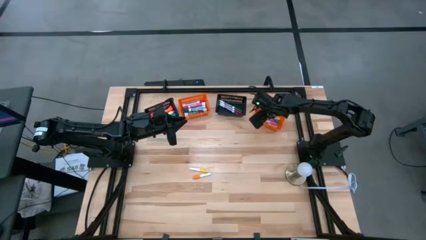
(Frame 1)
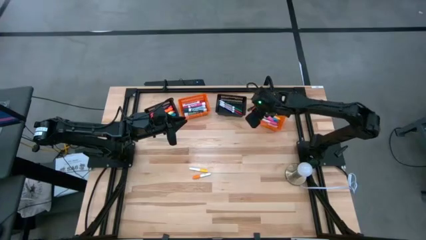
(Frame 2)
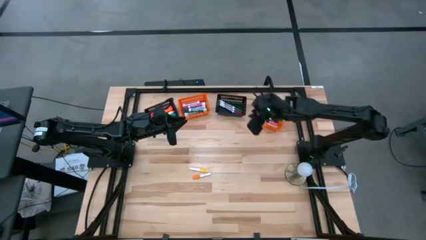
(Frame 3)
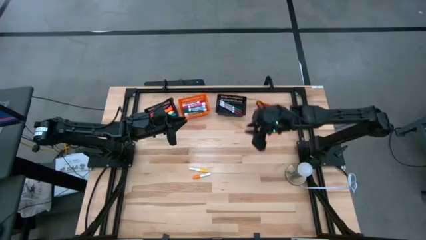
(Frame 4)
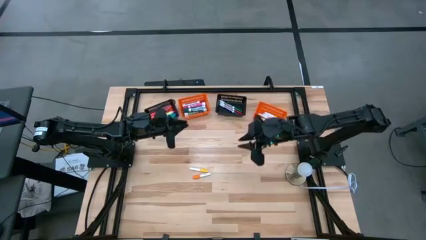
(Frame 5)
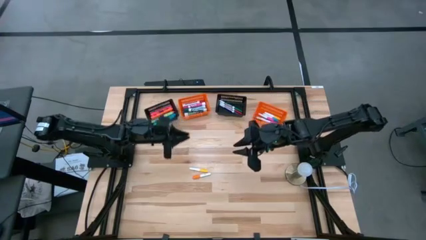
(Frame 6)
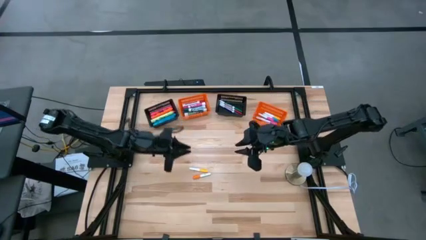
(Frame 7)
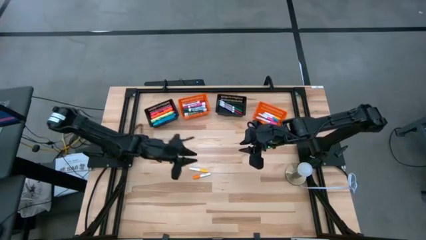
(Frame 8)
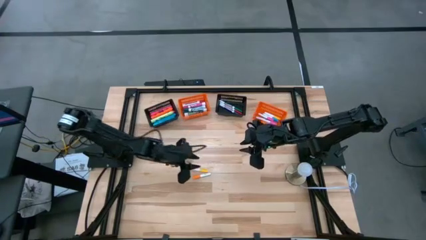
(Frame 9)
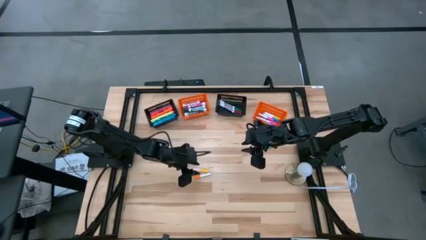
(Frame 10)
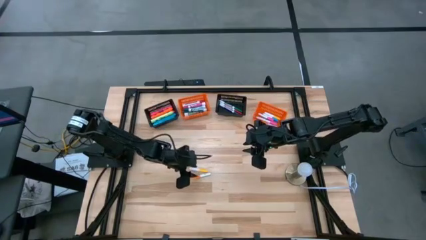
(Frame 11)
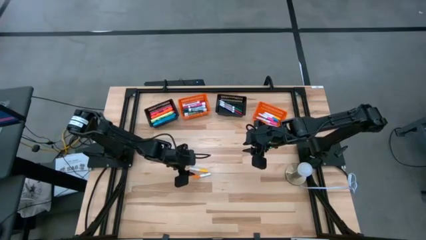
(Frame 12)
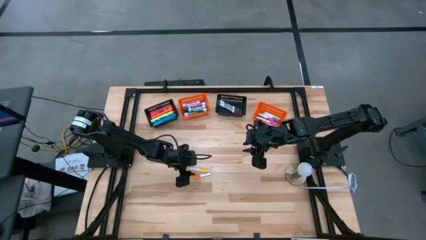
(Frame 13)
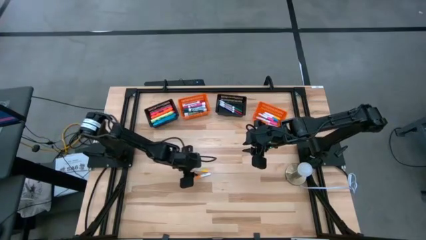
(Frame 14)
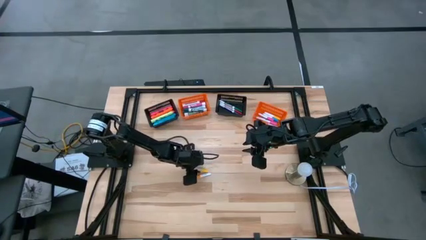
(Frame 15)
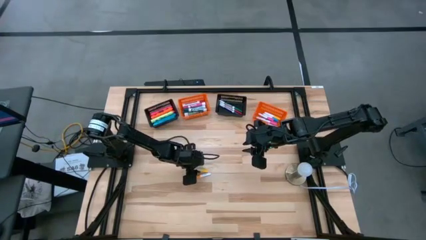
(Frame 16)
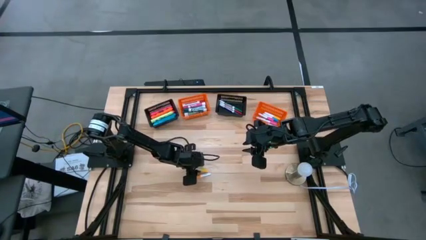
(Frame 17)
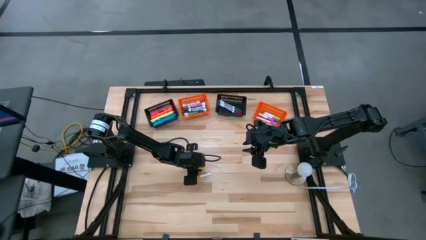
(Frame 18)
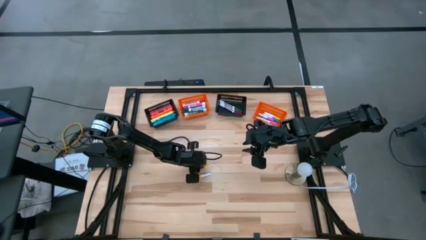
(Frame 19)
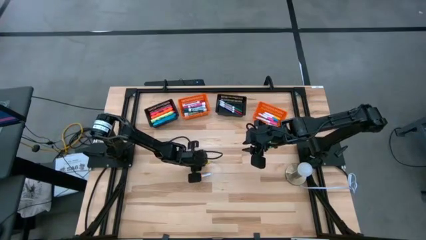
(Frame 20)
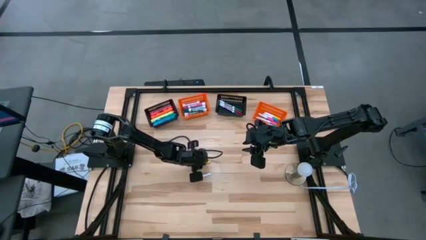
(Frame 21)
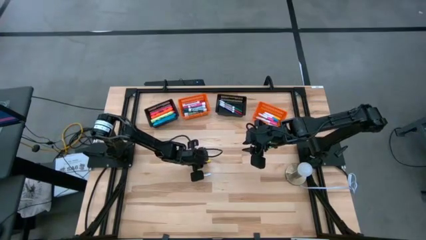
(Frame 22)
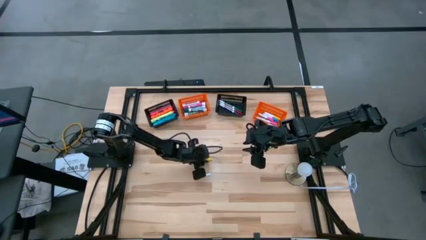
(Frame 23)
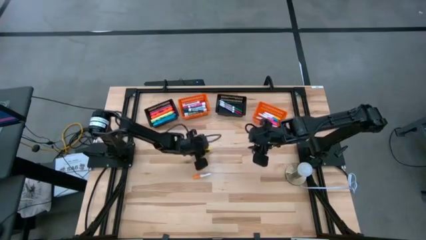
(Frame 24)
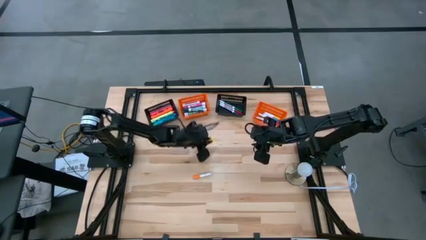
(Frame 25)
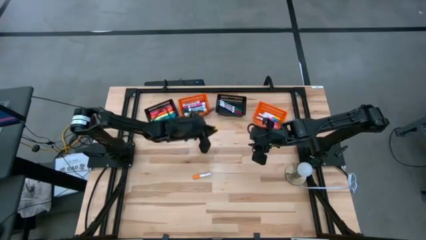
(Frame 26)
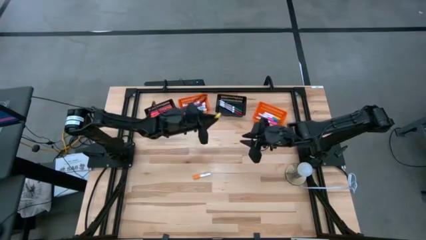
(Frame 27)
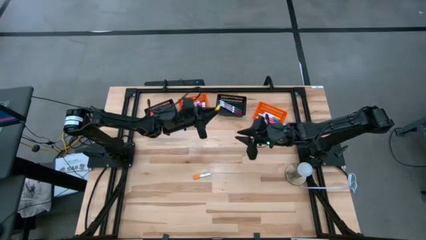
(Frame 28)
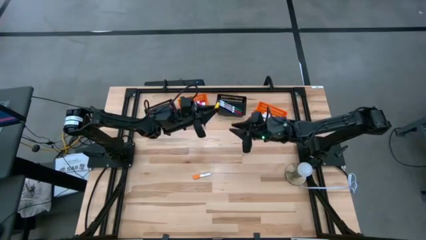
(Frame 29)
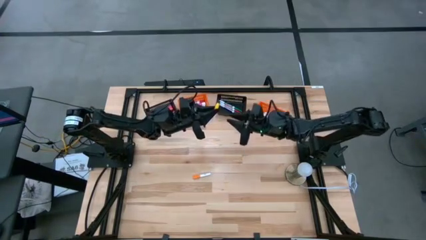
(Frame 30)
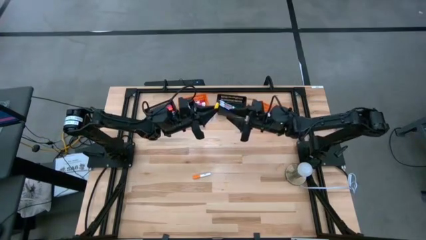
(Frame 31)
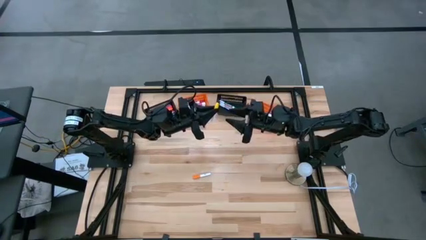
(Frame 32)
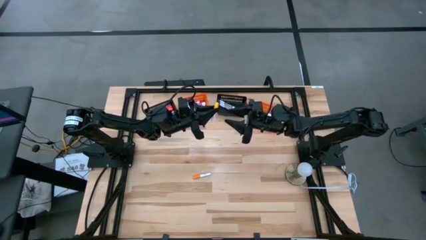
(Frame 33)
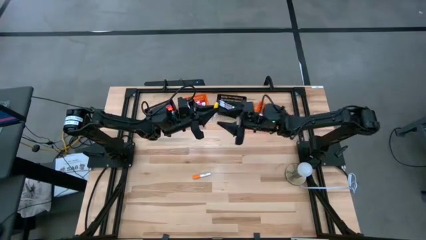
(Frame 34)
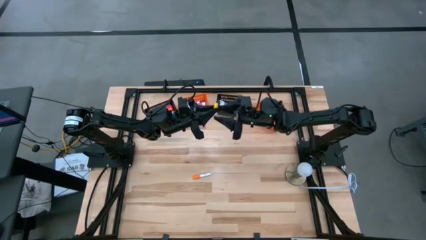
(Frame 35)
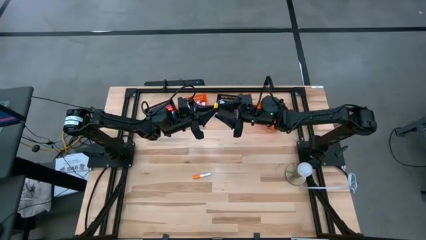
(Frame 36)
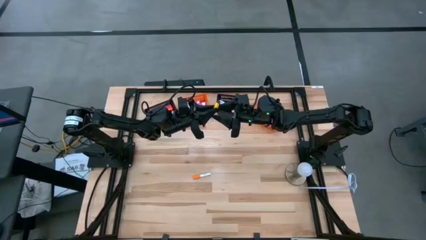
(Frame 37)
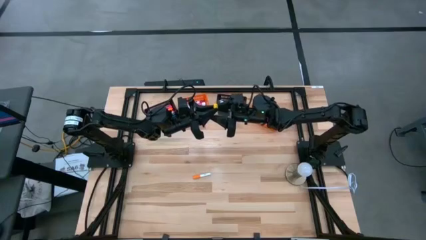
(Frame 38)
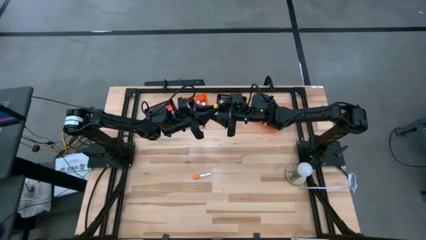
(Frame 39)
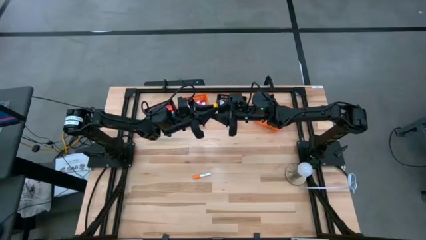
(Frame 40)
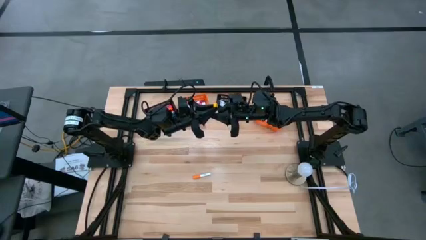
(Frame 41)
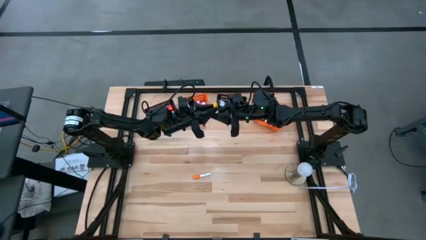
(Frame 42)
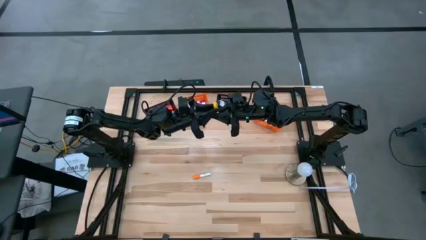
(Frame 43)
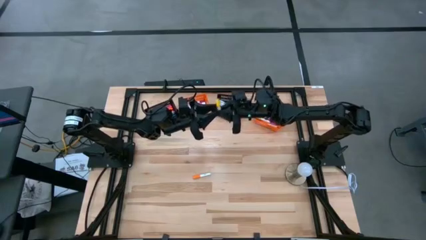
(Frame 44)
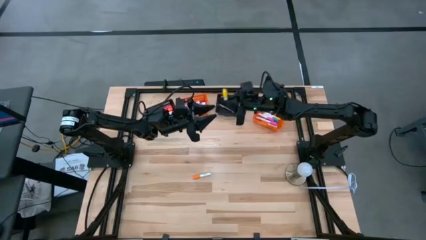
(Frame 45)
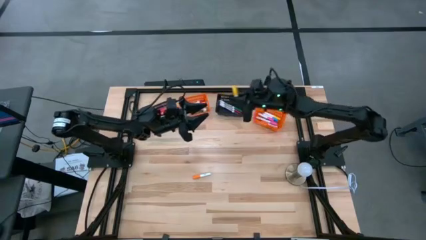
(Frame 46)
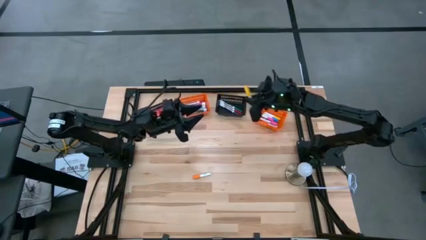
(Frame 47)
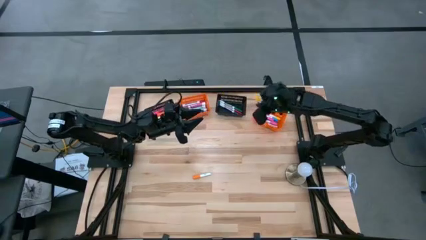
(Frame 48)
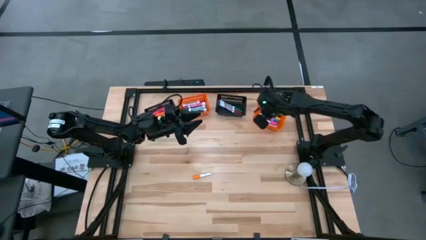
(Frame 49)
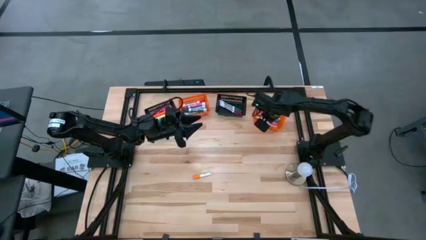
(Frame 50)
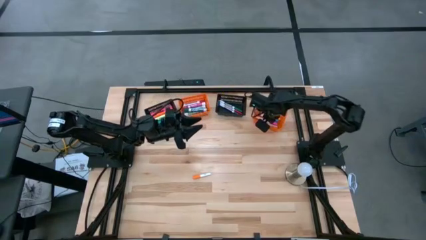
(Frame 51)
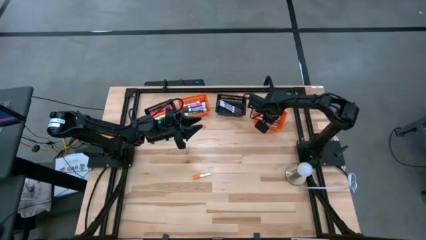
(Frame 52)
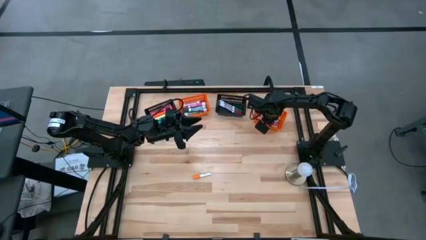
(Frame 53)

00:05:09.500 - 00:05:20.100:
Task: Pick & Place Markers
Put the yellow small highlighter pen into the left orange bin

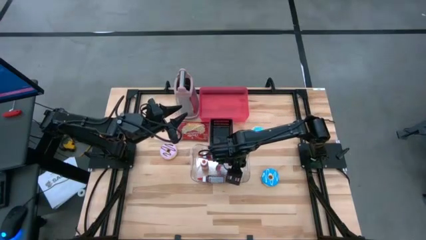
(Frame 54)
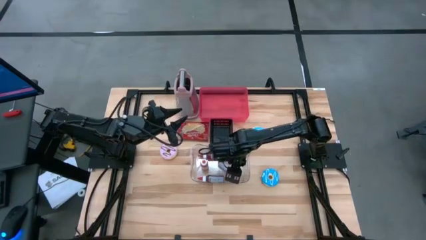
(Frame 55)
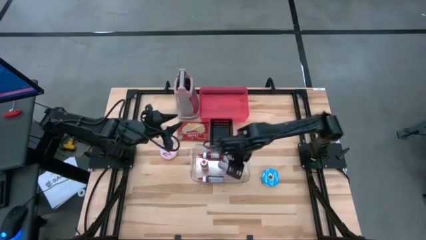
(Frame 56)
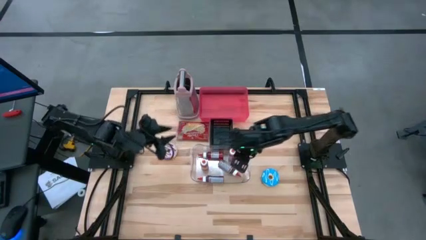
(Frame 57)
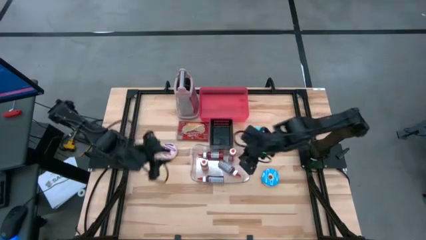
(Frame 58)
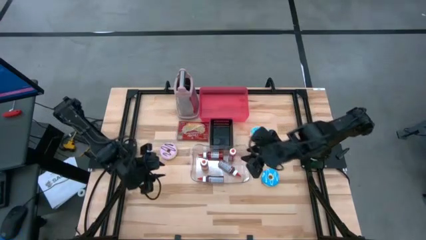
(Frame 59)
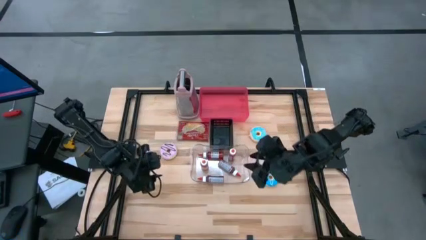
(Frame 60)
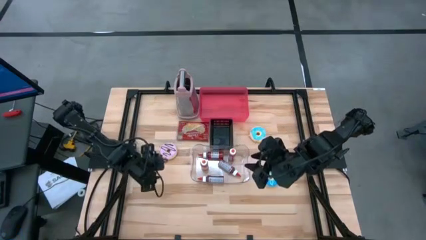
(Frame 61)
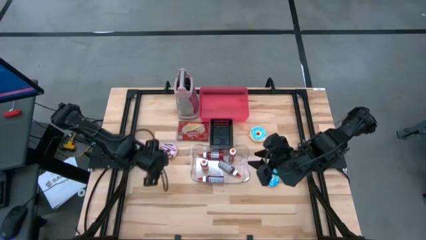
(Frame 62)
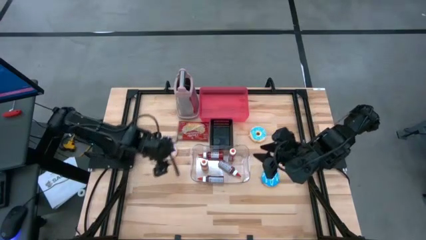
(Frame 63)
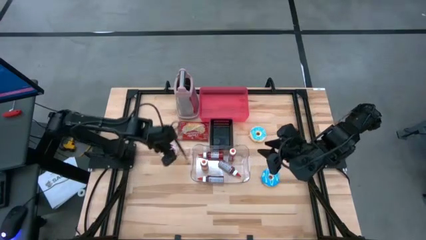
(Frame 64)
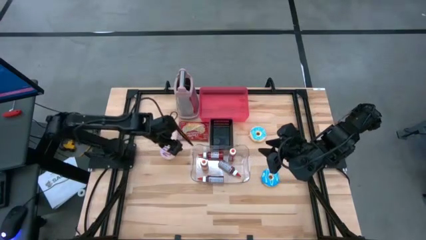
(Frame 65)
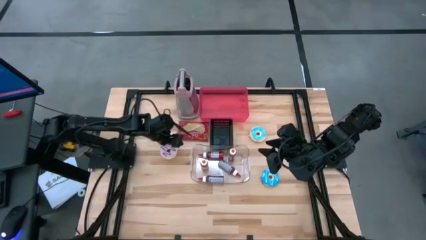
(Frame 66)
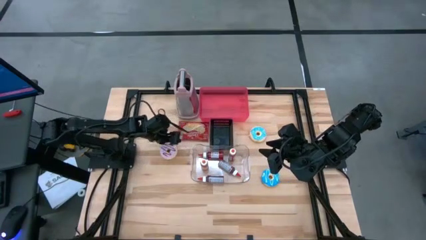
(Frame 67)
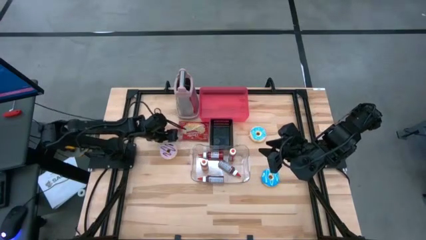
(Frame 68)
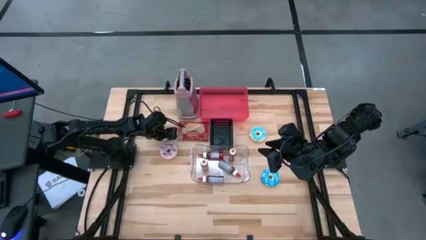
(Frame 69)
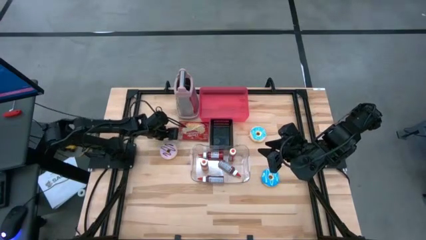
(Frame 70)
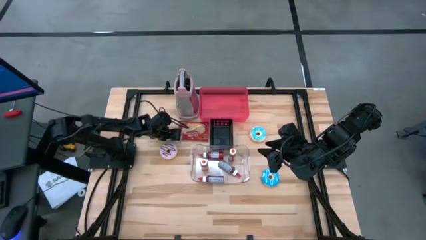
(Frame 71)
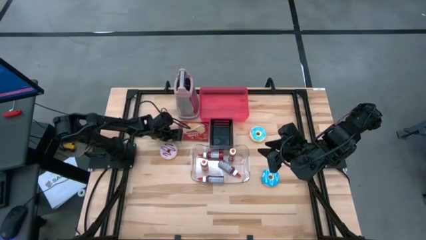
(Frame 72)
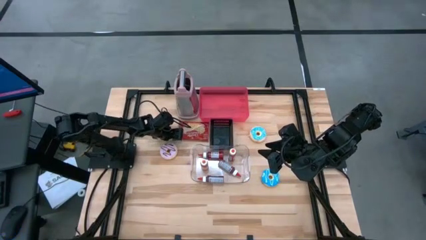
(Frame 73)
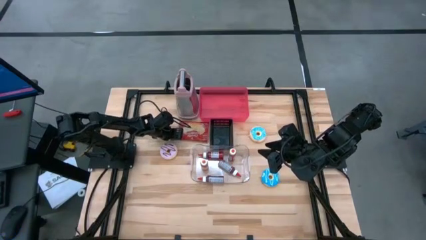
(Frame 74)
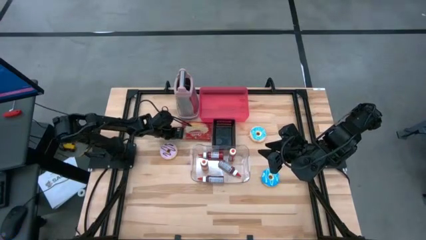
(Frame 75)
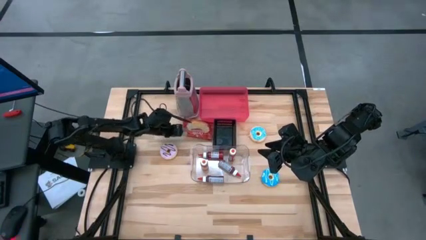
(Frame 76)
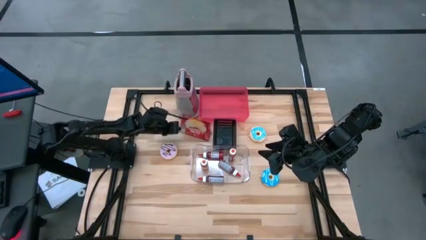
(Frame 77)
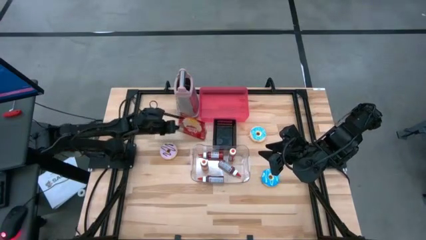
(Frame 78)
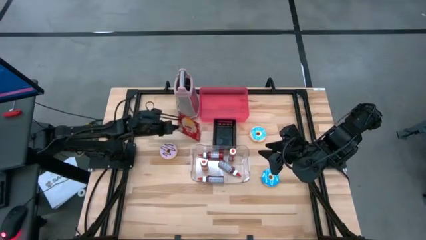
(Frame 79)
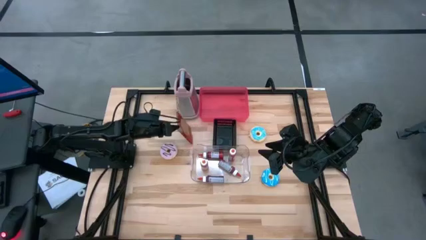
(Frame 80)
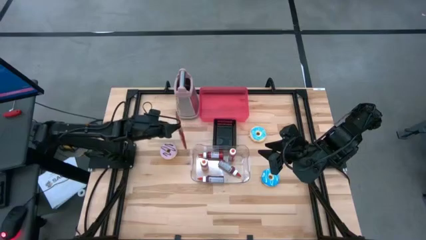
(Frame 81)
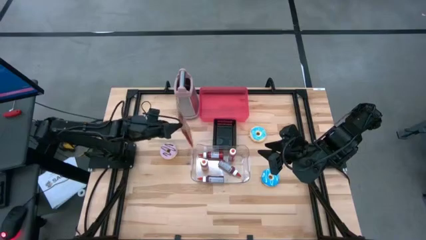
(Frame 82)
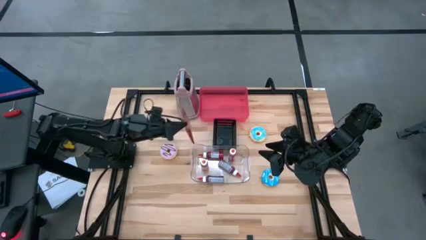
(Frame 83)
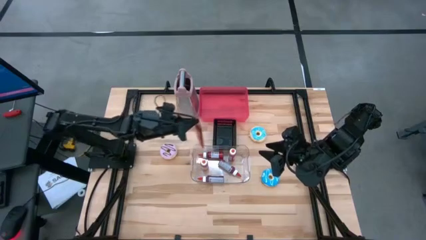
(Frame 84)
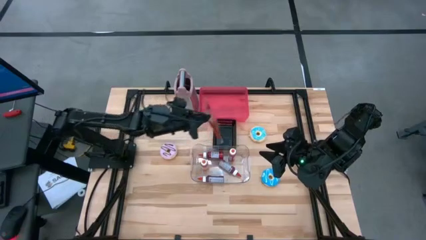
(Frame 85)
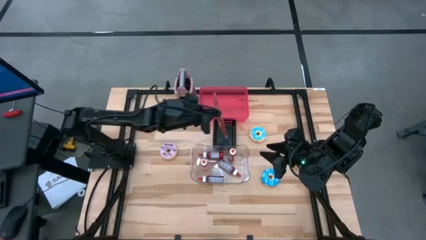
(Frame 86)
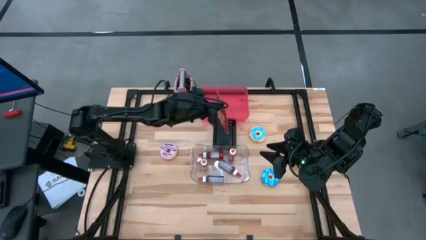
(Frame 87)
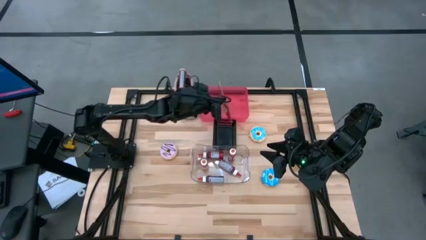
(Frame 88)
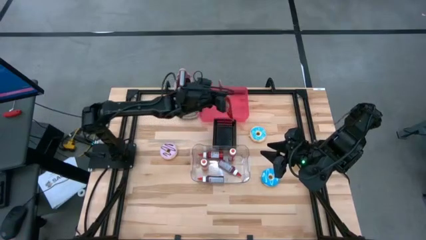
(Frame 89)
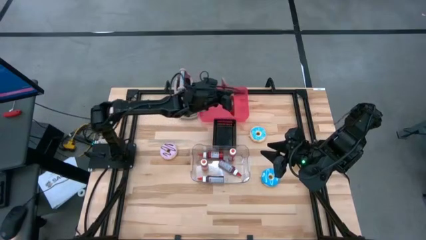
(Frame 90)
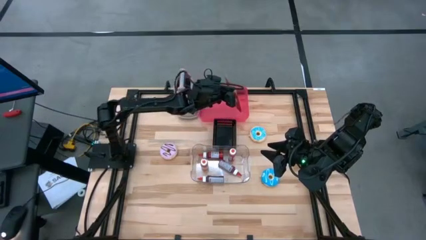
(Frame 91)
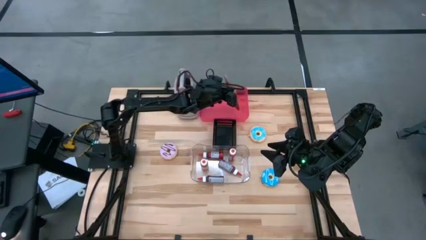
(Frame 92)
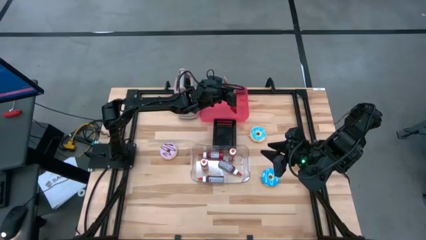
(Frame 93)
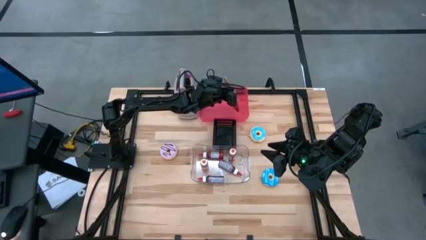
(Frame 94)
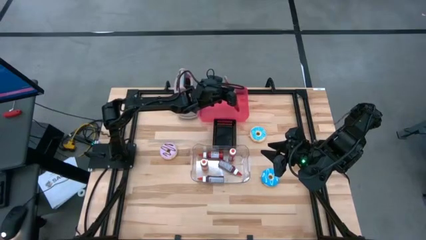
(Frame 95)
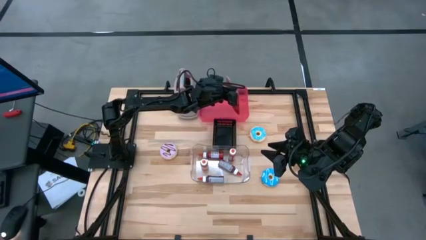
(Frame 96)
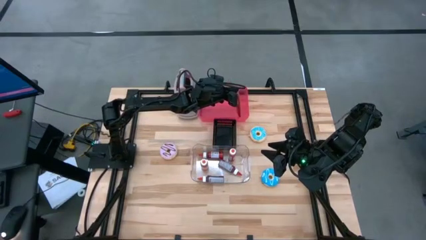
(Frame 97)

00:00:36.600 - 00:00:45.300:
Task: Pick & Place Food Item
Put the red popcorn bag into the red bin
